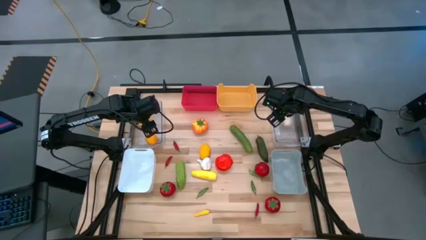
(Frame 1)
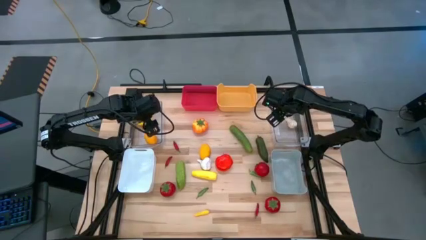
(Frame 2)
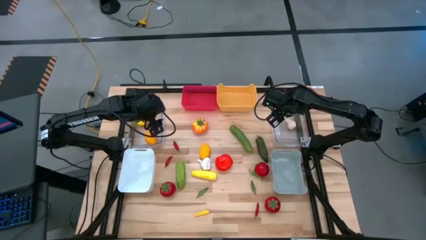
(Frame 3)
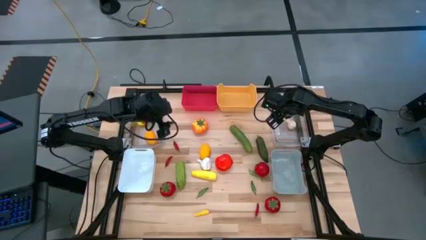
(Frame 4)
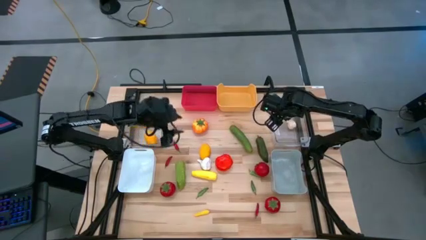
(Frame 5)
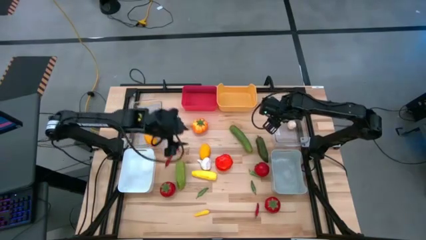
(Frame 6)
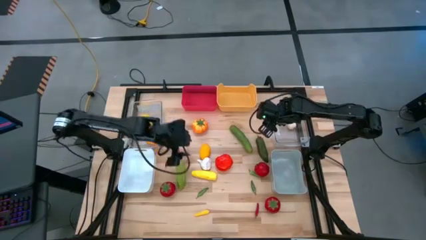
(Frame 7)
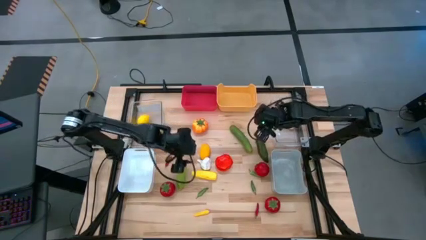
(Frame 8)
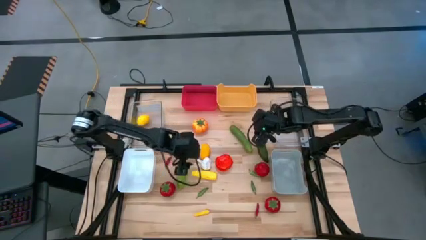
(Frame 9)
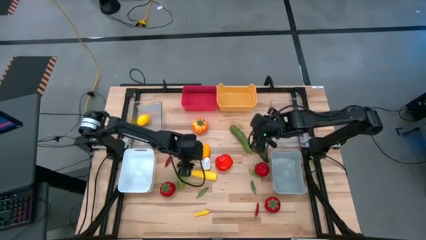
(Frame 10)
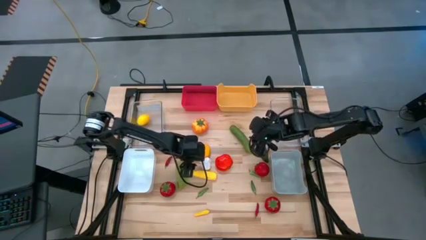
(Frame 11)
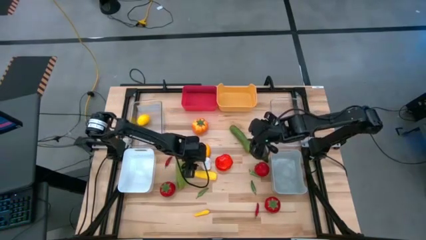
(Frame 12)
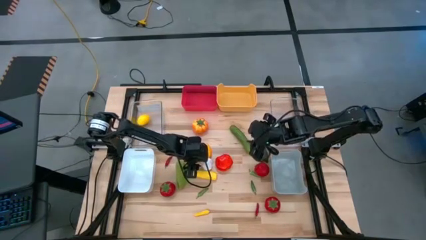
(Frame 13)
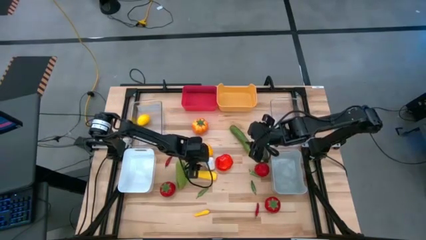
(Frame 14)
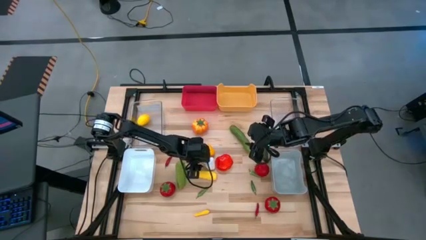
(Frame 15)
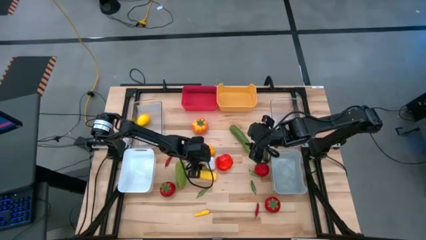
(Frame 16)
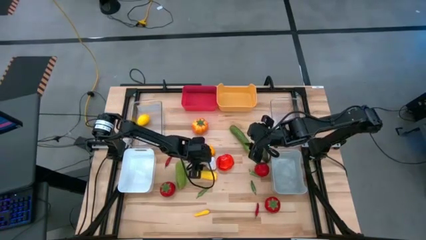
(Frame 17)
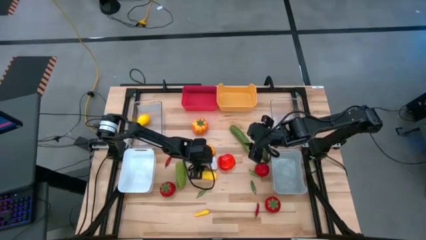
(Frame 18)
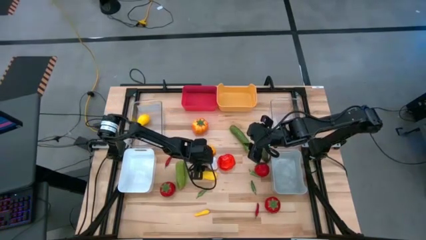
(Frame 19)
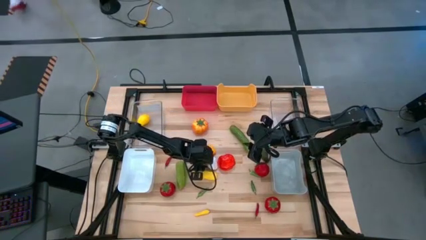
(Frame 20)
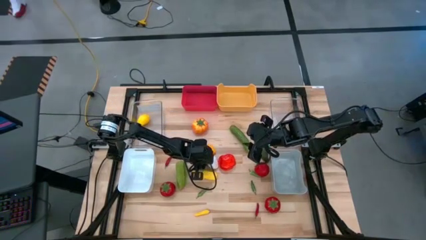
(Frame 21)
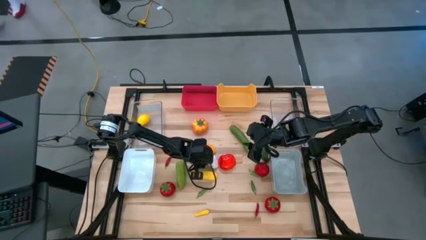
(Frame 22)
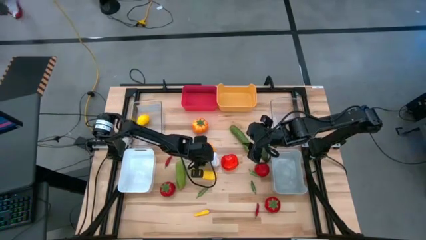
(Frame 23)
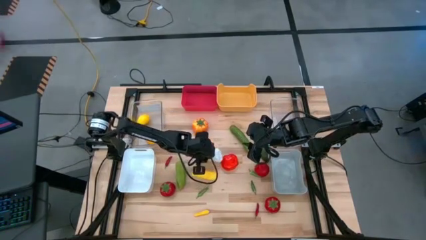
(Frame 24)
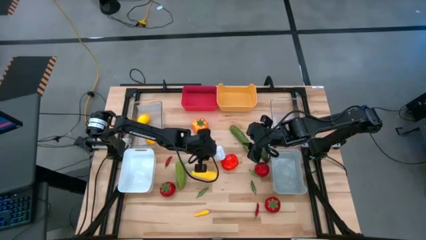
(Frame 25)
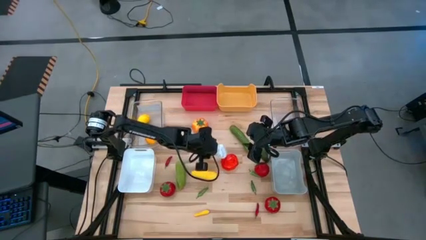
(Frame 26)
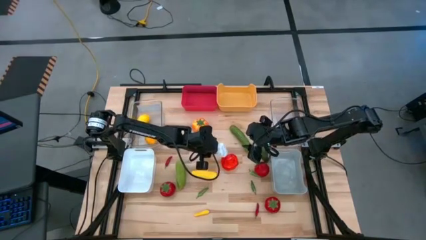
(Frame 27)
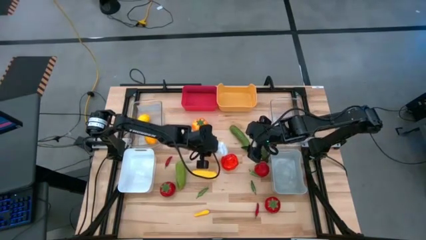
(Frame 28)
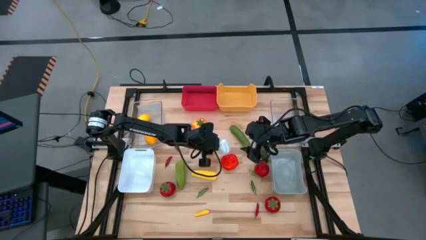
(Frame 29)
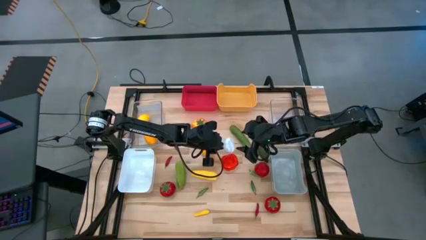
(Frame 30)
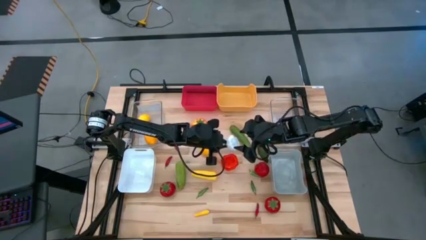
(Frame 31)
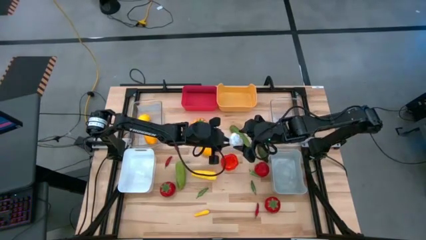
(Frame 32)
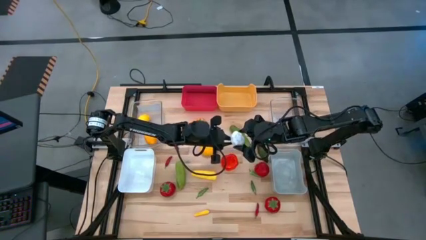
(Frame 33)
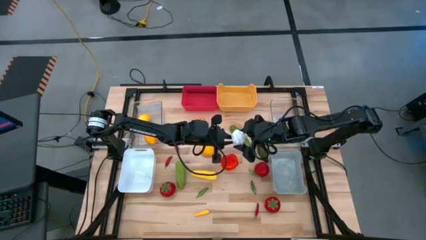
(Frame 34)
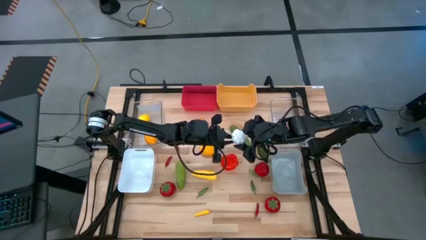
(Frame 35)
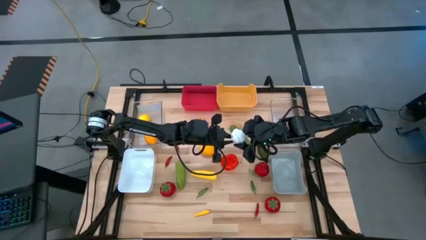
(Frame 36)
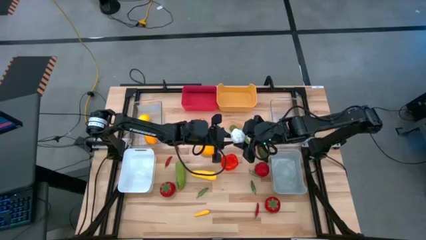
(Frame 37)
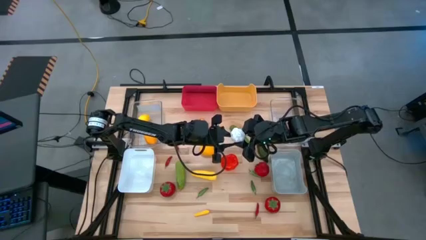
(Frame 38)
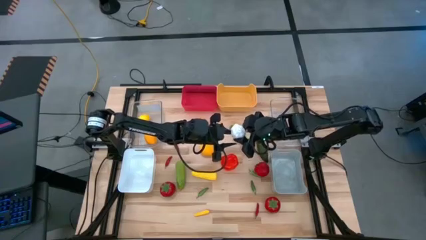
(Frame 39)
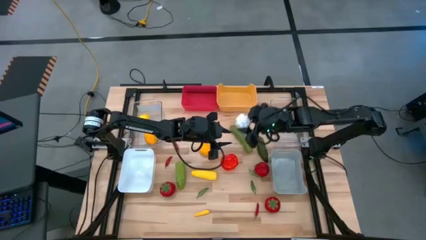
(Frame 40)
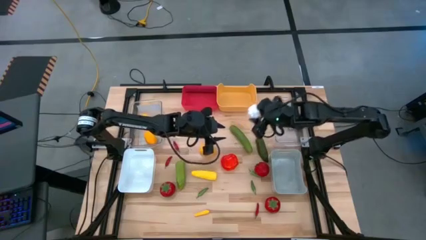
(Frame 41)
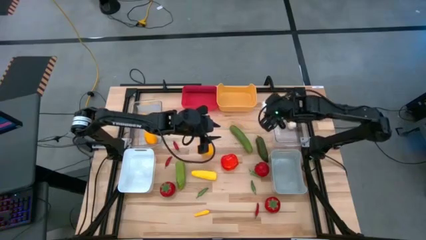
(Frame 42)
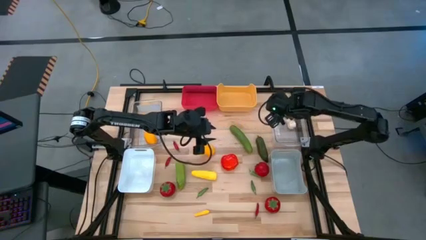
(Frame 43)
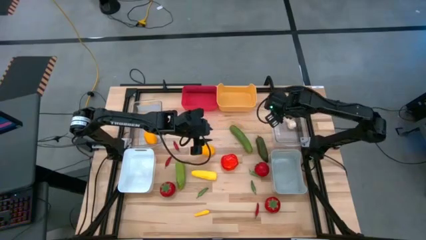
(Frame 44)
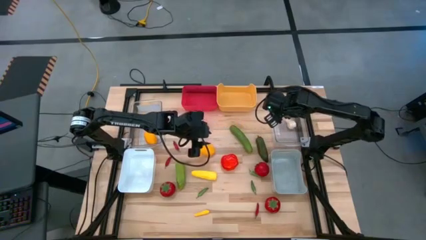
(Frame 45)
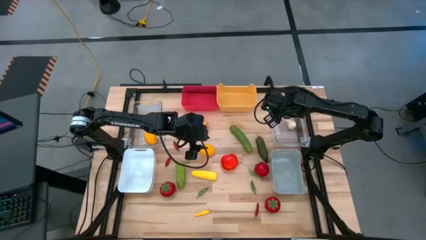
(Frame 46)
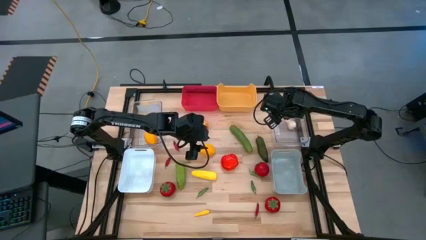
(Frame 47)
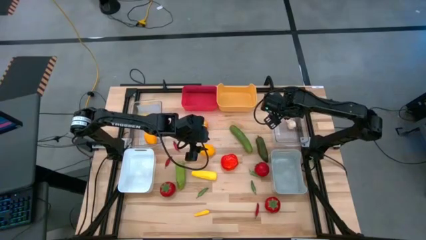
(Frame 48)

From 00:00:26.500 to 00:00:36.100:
Task: Sort produce into baskets
Put the white garlic into the right transparent bin

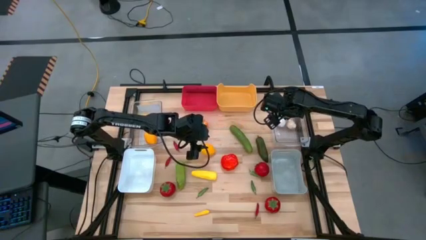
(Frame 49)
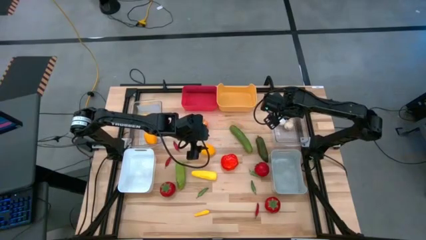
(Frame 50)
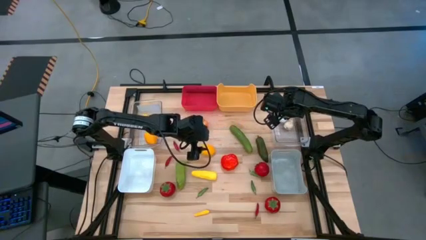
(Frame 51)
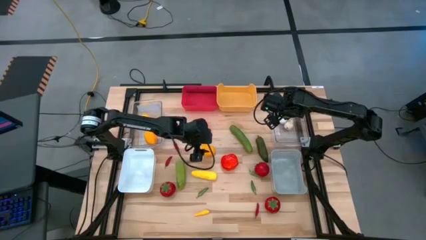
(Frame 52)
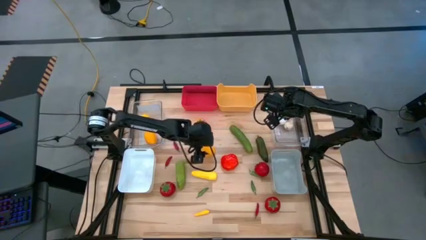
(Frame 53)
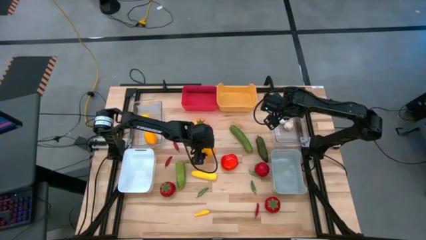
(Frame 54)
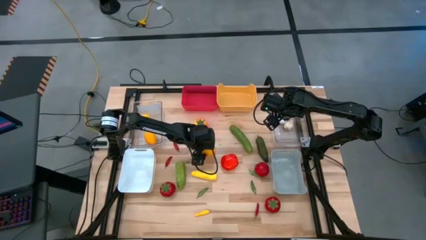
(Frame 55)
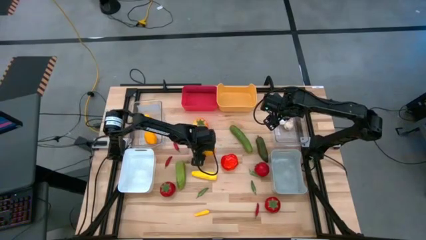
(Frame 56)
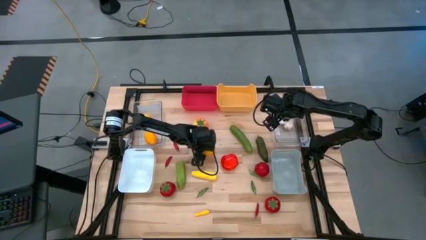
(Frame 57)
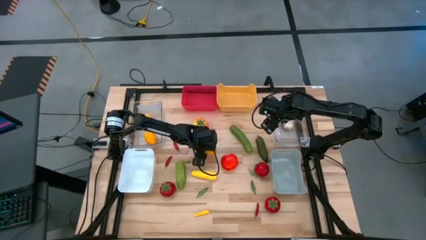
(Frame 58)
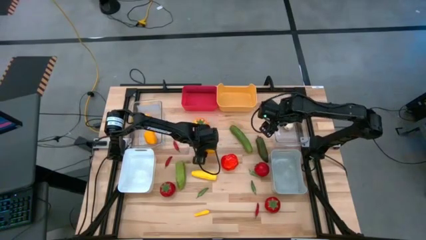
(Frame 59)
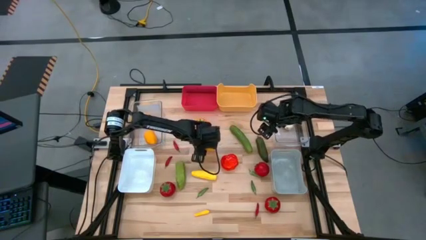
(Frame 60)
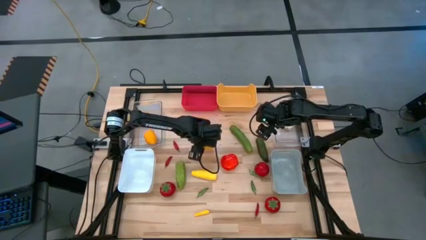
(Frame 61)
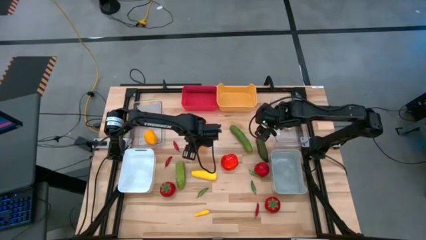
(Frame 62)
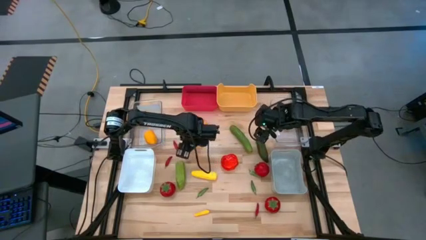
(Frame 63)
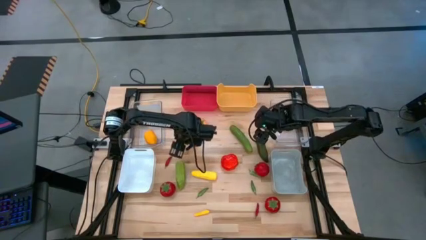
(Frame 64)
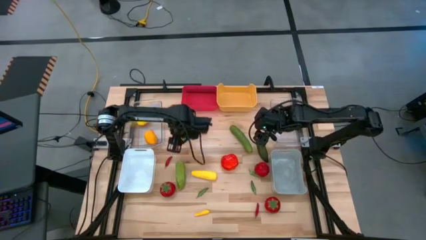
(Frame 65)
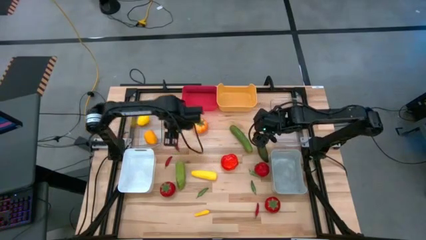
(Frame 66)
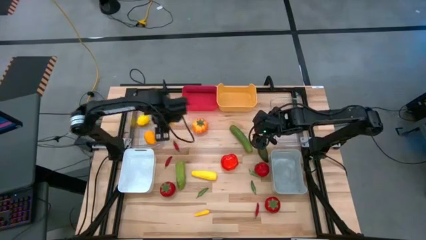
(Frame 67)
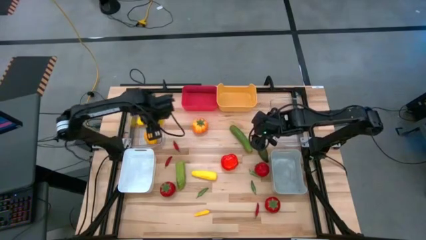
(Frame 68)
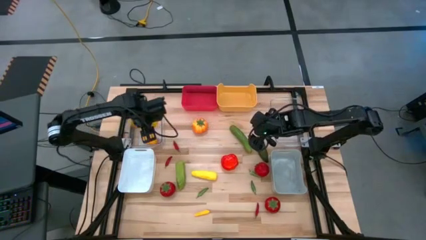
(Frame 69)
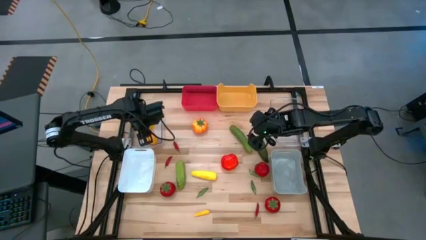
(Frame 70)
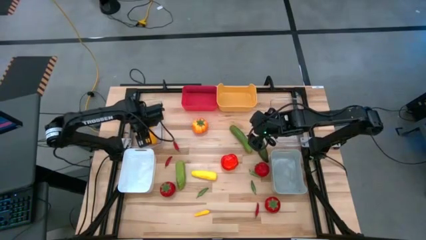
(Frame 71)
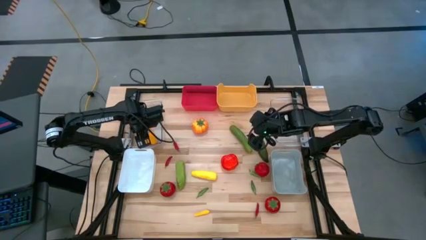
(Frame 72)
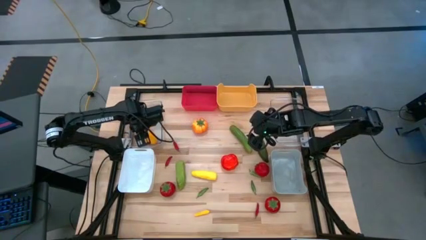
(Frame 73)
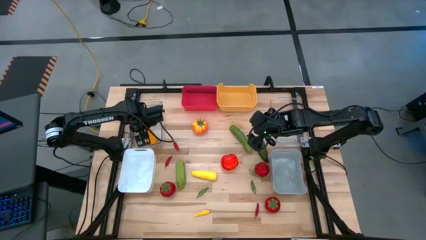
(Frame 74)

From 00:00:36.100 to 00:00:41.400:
Put the yellow lemon into the left transparent bin

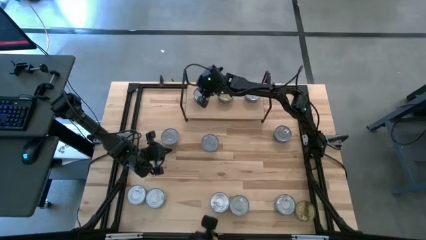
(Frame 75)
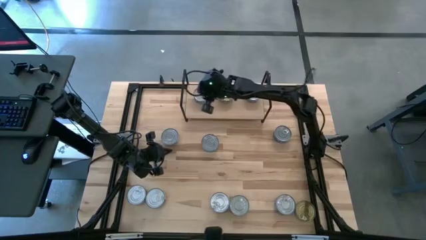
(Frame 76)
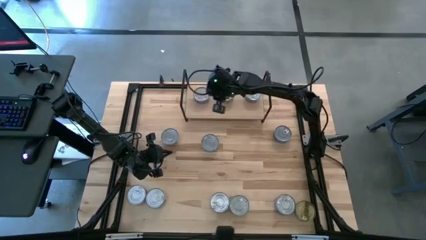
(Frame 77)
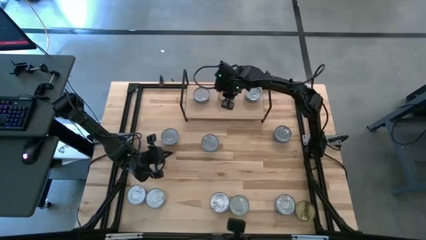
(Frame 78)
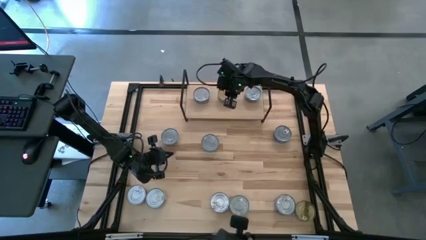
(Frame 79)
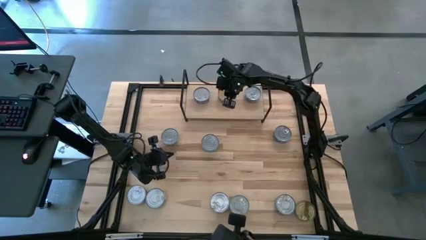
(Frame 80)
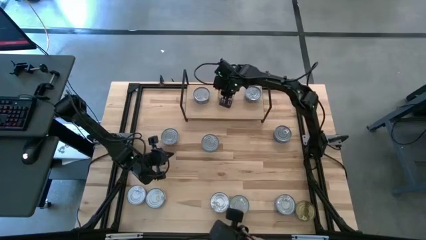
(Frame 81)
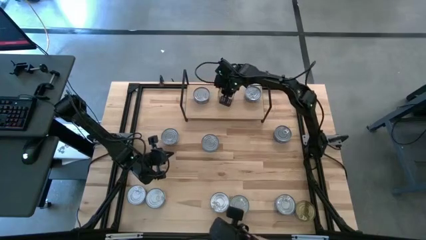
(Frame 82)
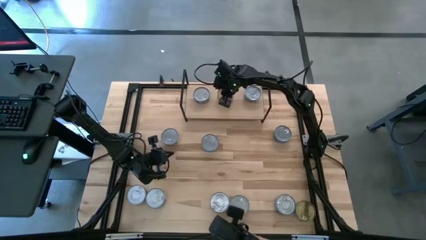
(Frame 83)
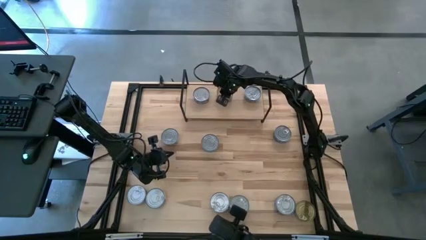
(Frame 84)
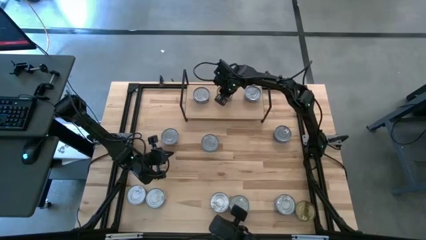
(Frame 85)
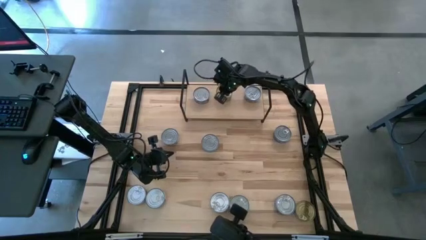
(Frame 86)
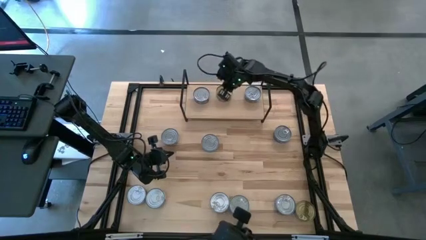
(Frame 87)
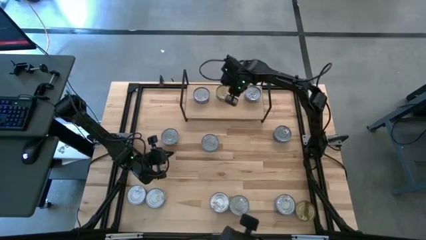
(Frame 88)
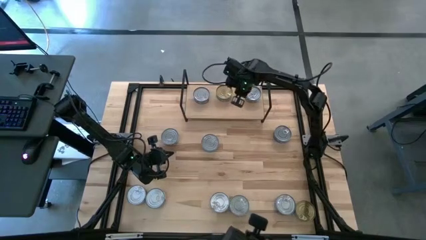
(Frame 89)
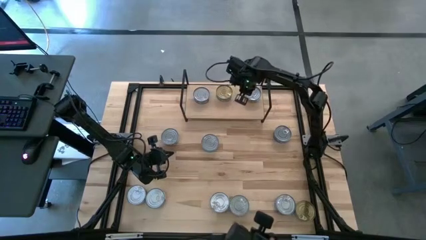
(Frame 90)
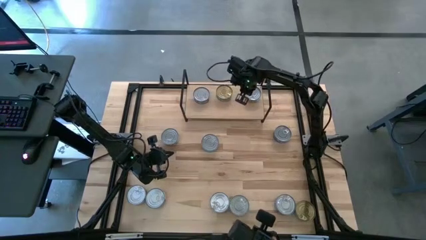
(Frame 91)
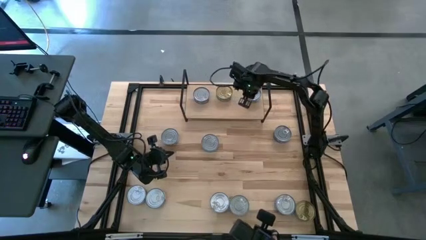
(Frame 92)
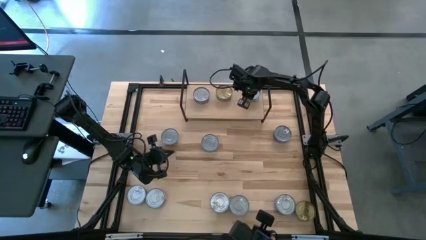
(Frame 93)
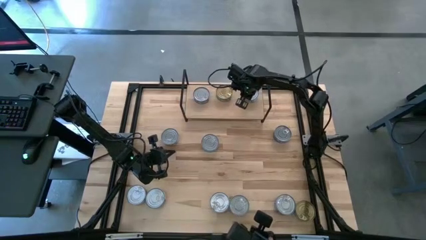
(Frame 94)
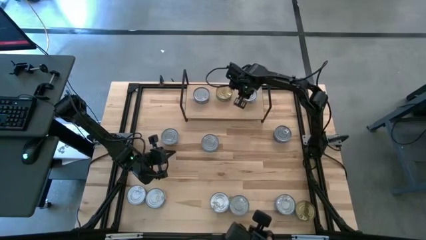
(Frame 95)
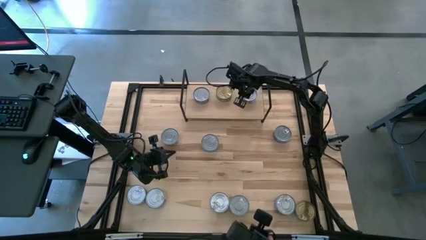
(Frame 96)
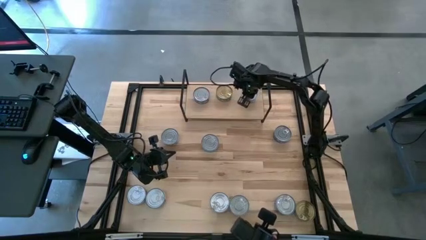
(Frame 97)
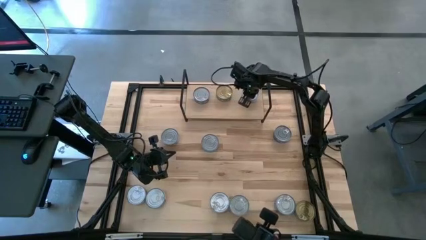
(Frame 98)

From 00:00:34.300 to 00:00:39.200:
Task: Stack canned seafood by type on shelf
Adjust the tuna cans on the shelf
